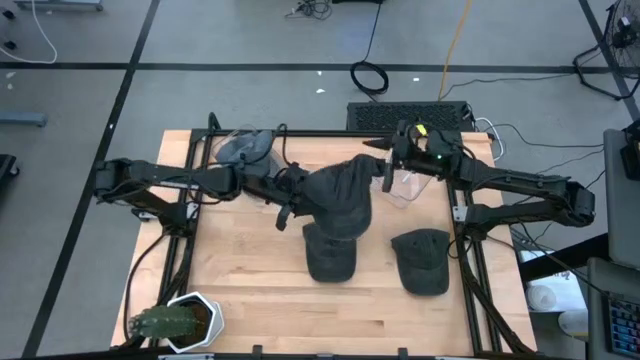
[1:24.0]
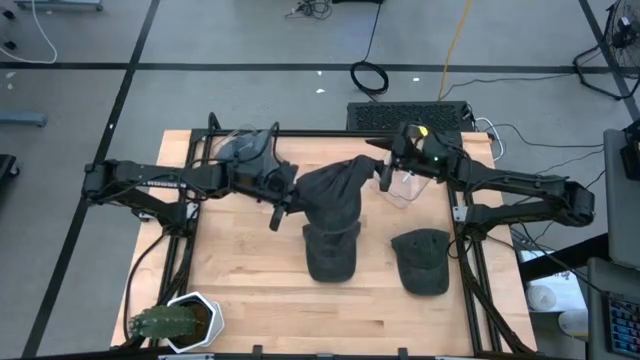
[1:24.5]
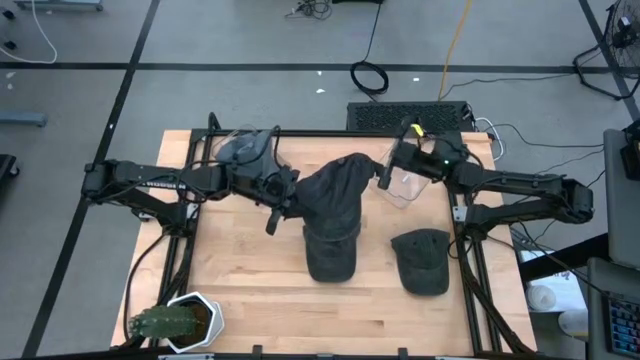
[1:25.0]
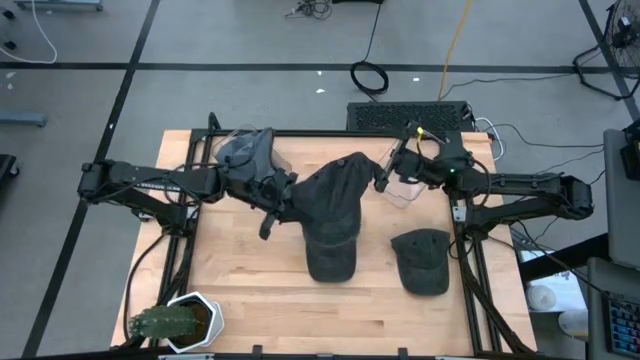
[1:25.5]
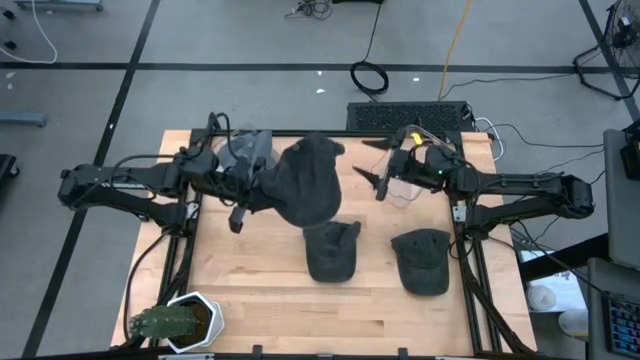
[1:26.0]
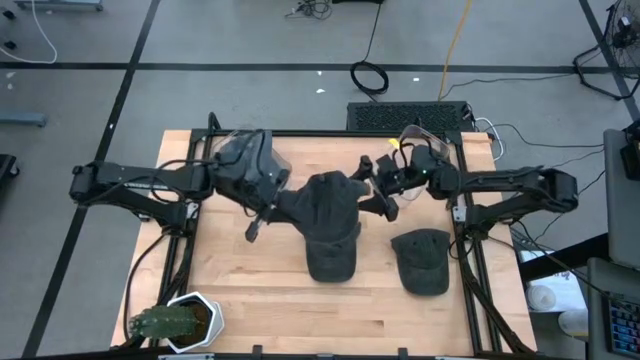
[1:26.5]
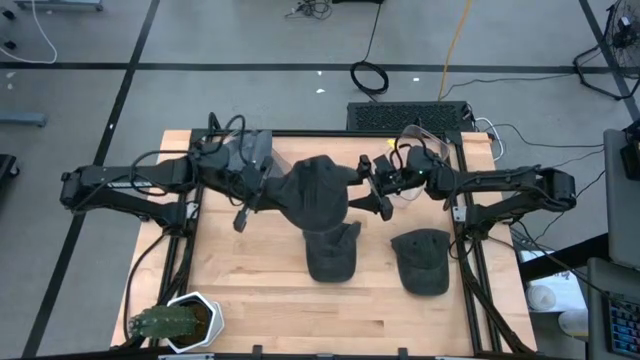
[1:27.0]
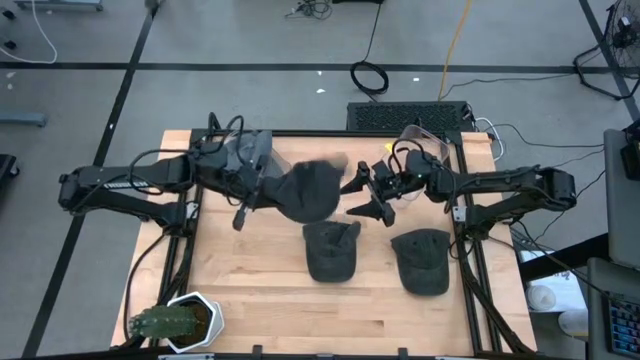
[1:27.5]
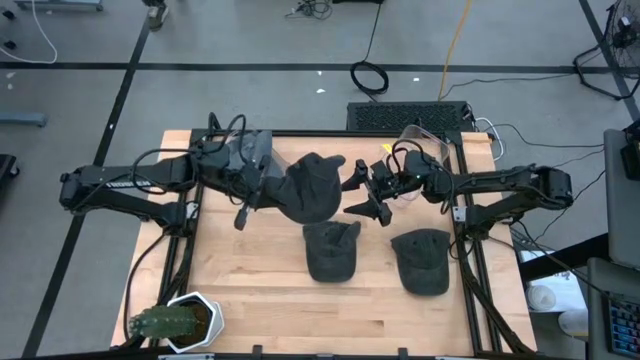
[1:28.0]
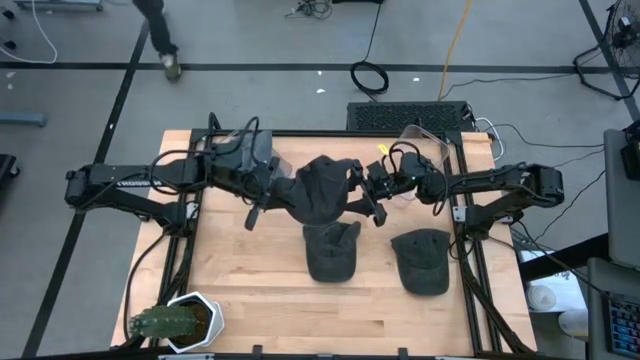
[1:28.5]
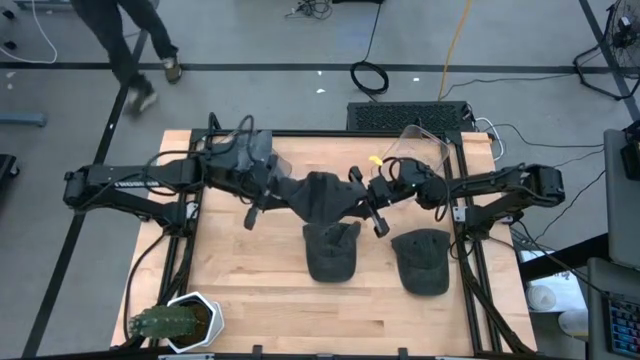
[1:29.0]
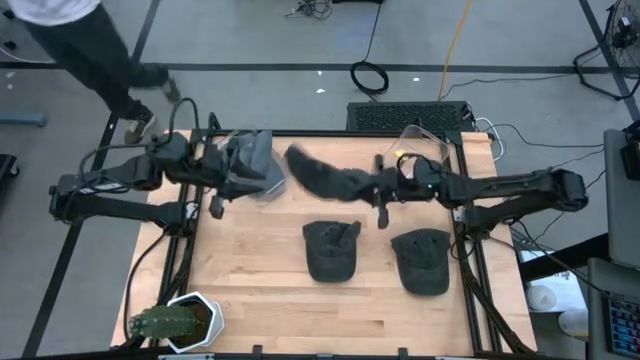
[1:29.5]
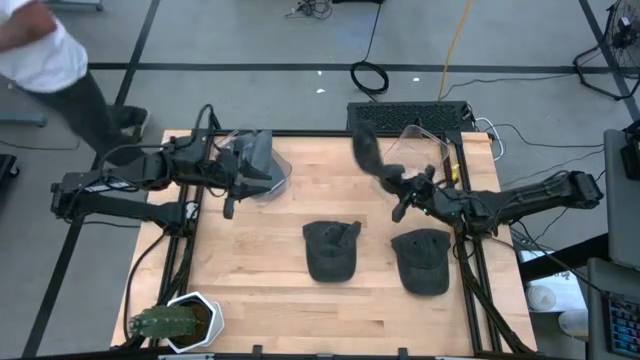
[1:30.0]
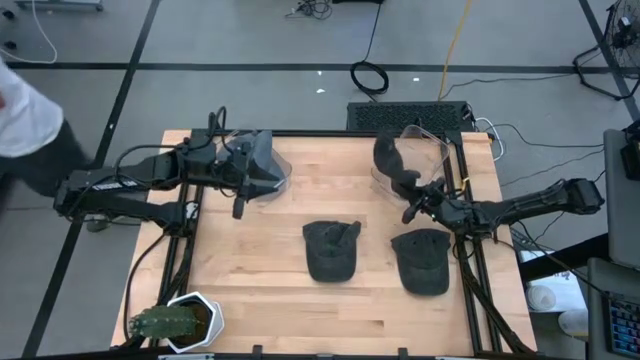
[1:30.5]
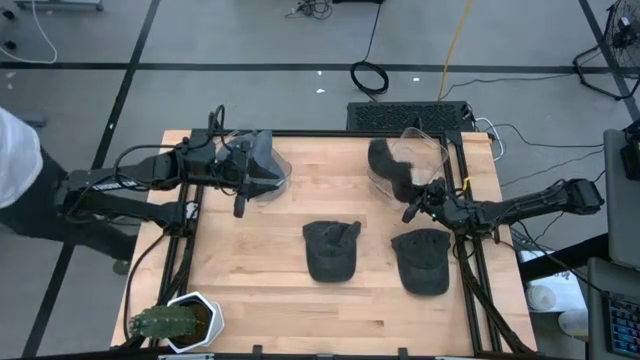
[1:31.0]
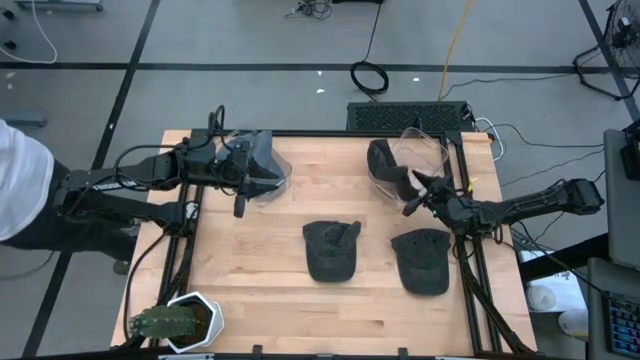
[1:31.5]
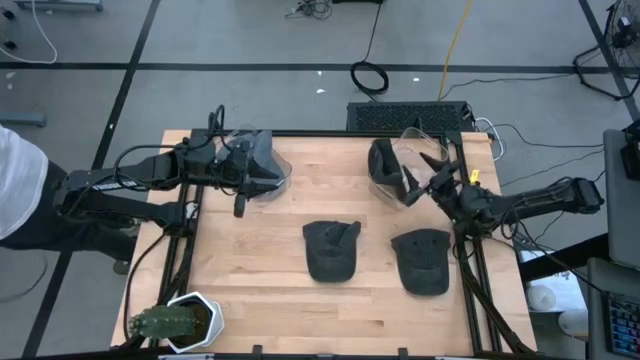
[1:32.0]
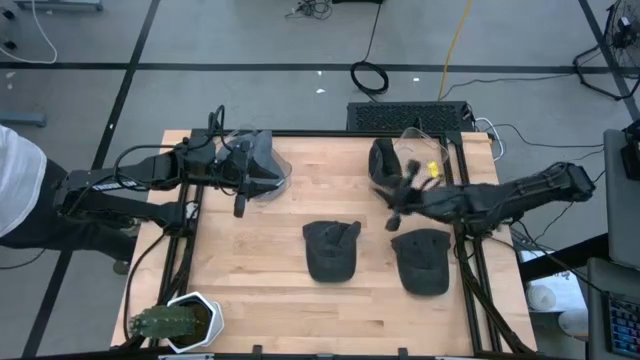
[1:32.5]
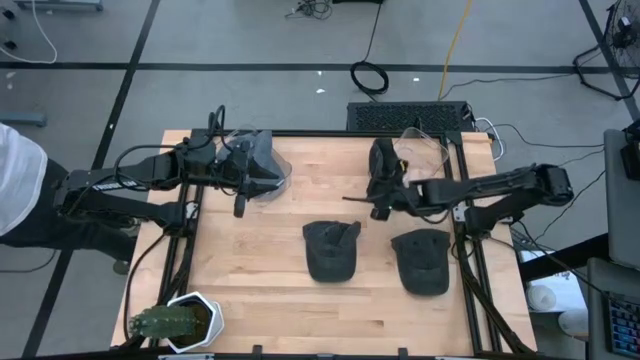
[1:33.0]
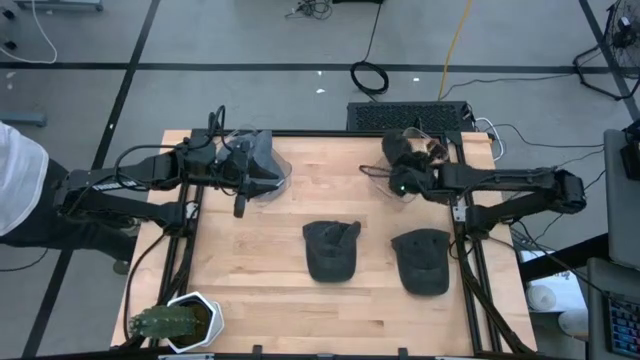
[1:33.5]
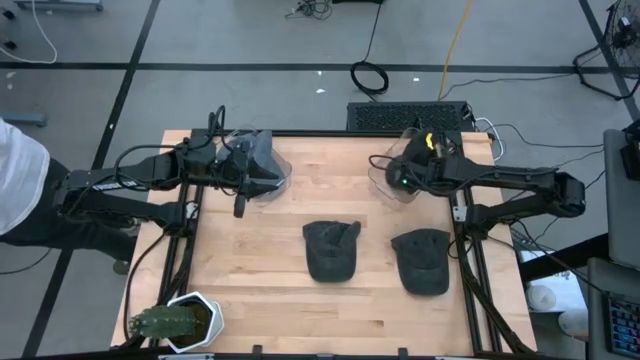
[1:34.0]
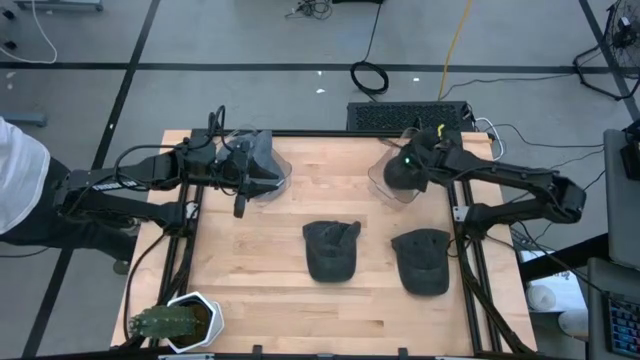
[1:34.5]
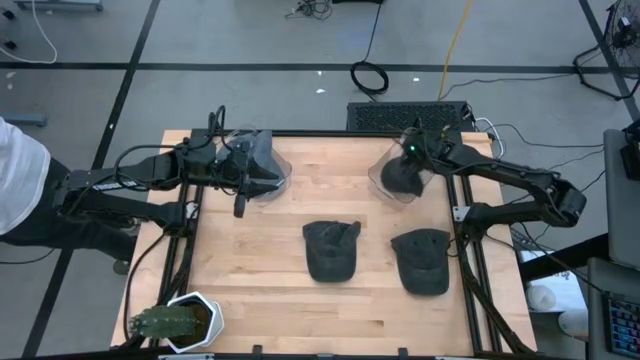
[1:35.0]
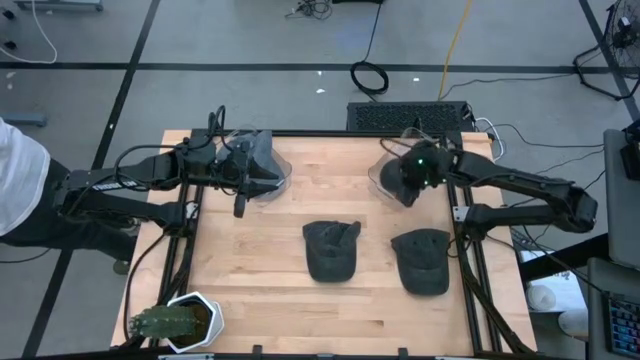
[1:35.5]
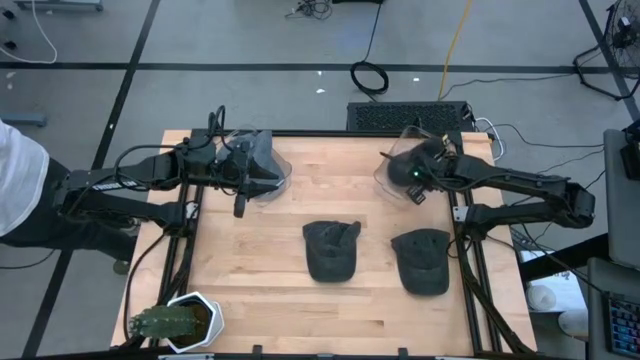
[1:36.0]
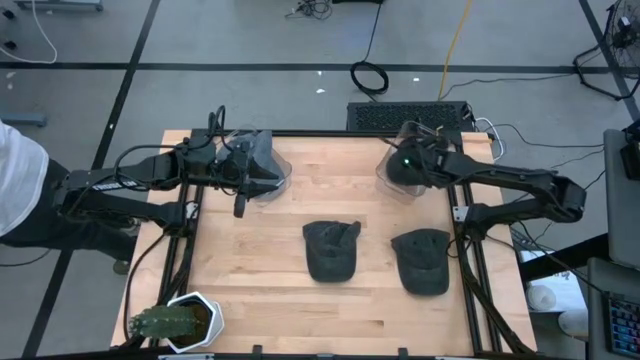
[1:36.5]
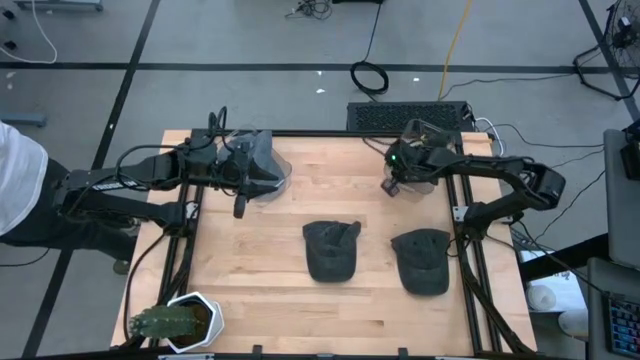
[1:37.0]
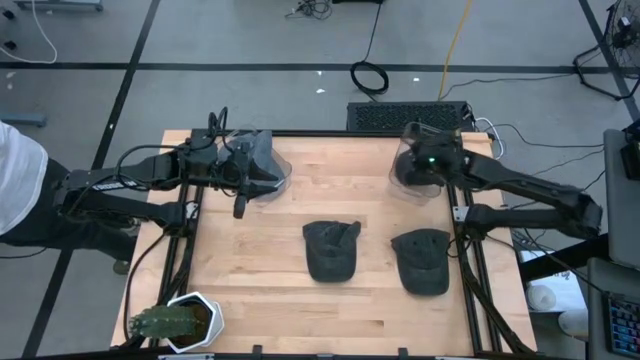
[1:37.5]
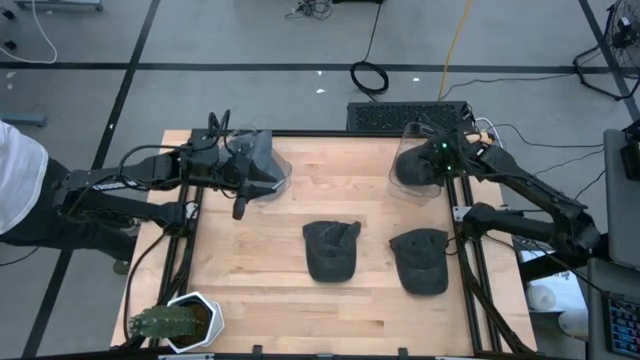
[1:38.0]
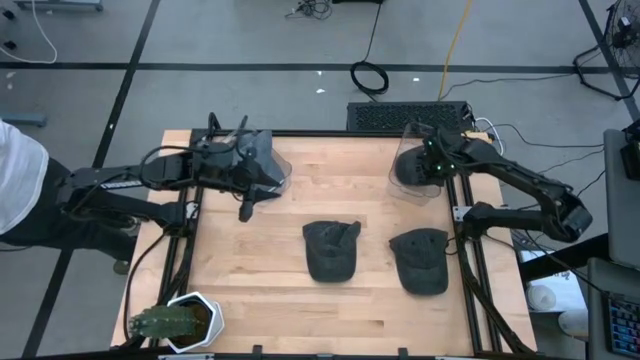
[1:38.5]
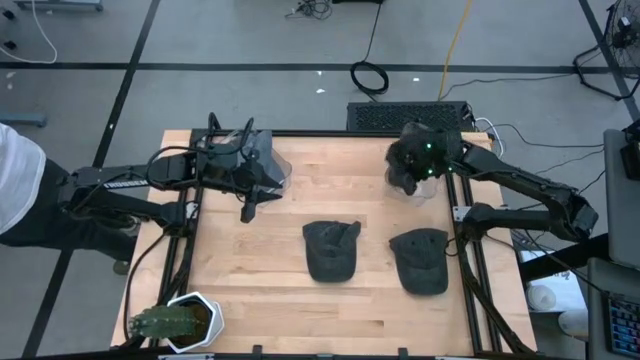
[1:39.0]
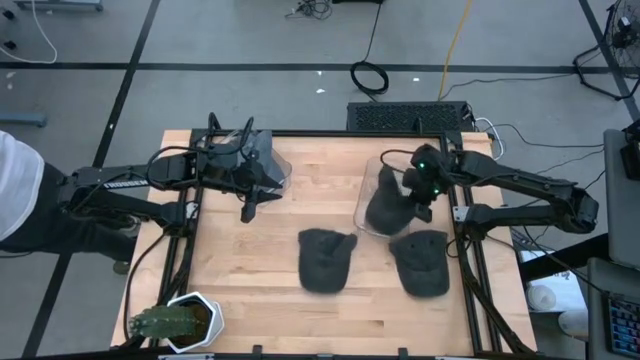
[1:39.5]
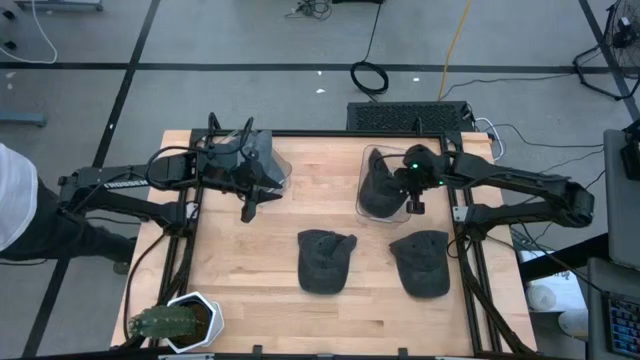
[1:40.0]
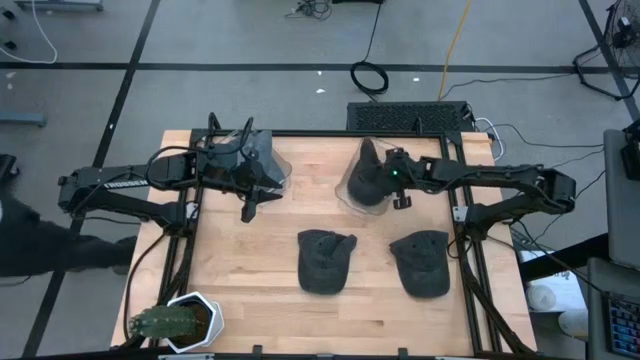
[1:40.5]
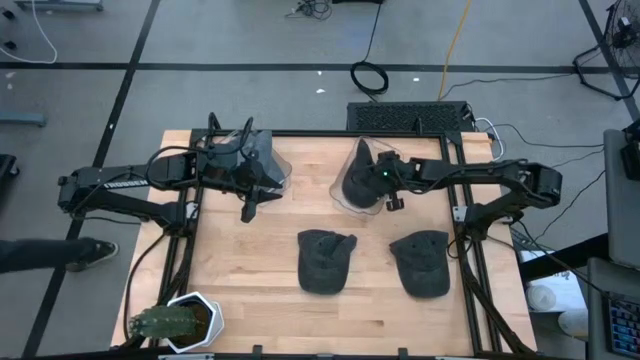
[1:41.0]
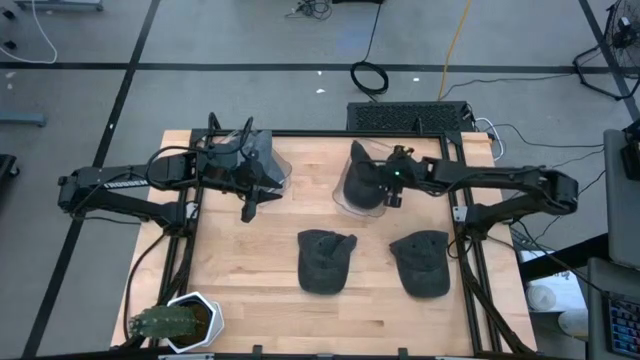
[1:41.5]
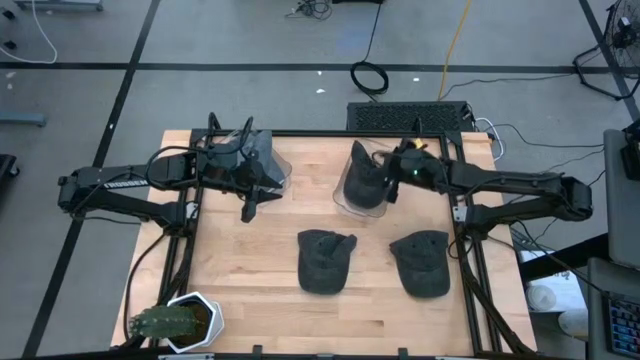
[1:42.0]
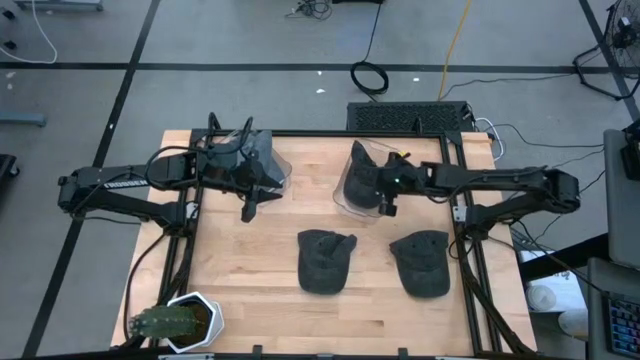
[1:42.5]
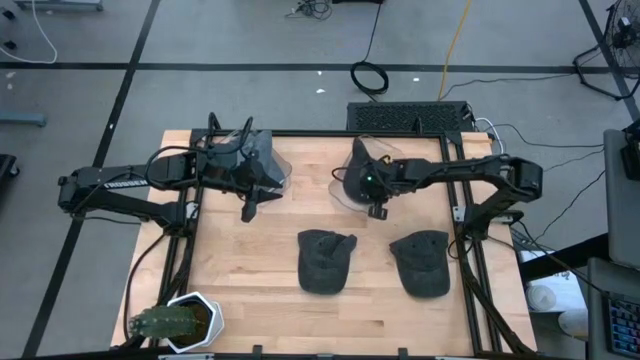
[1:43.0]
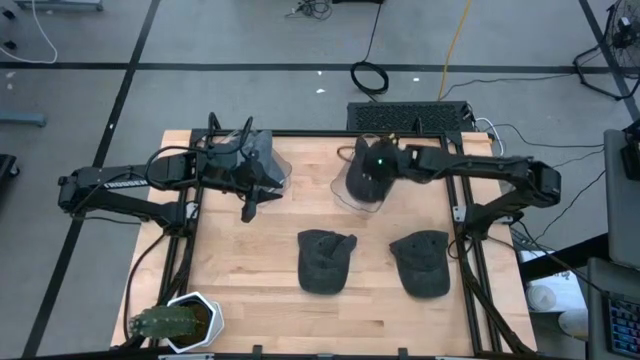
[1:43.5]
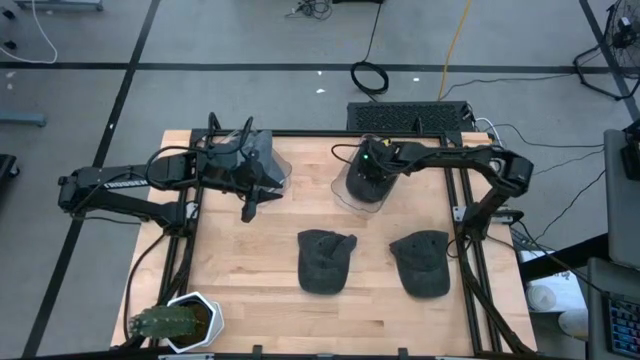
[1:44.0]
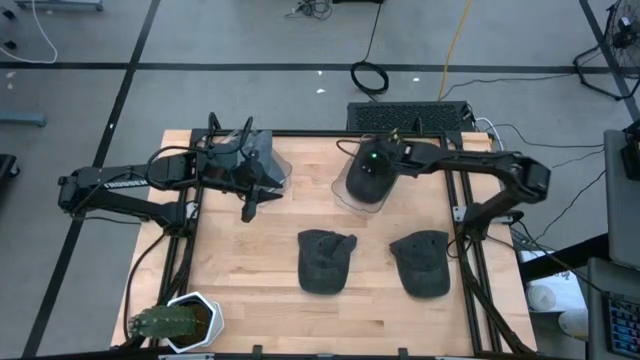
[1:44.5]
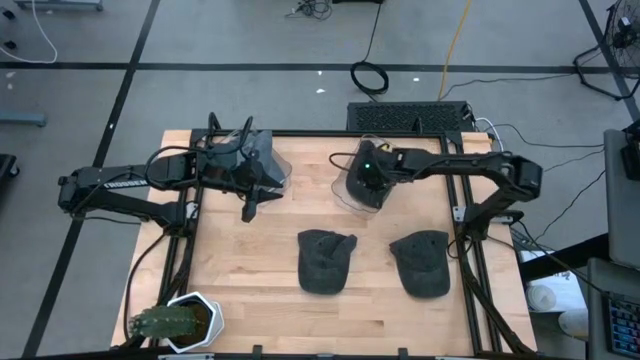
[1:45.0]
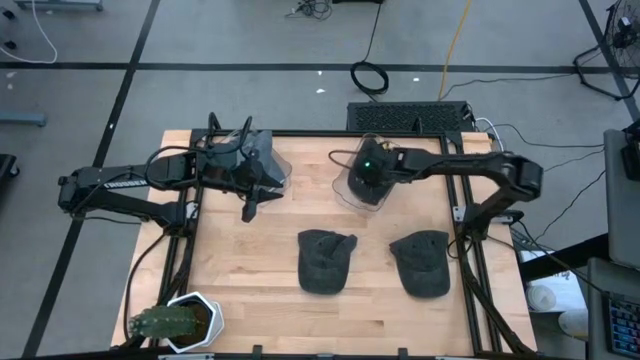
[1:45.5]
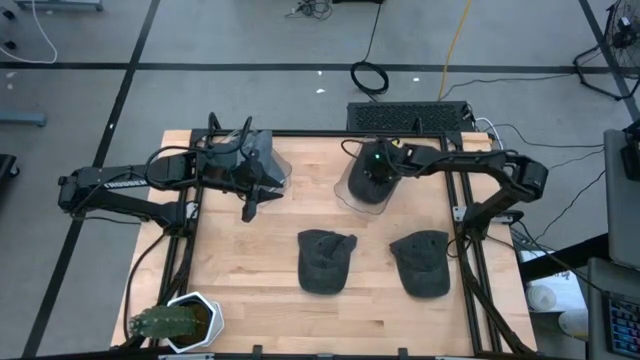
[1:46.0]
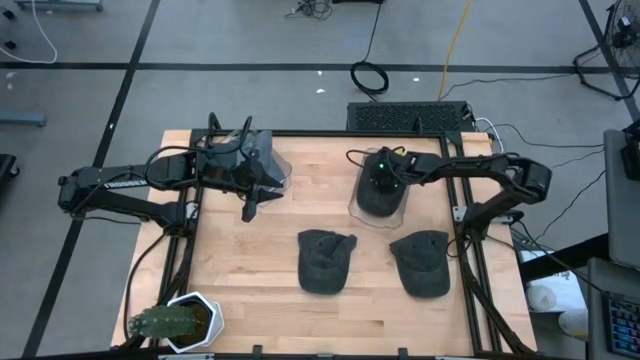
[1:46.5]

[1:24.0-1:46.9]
Task: Pick & Place hat
Put the left black cap into the right transparent bin
